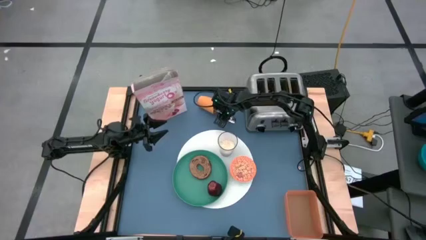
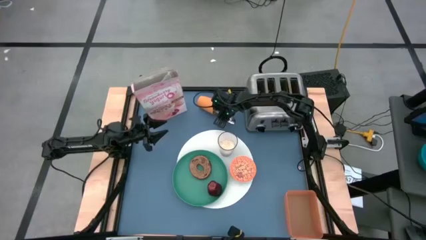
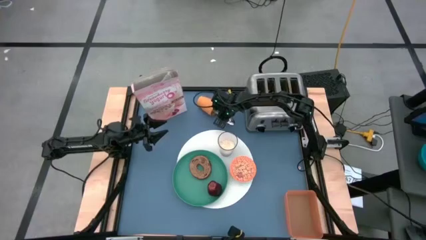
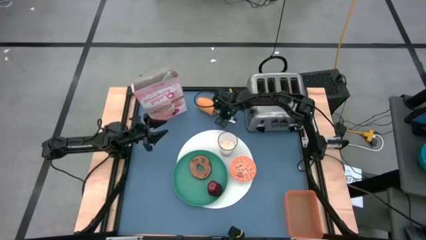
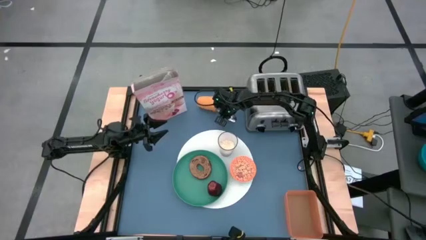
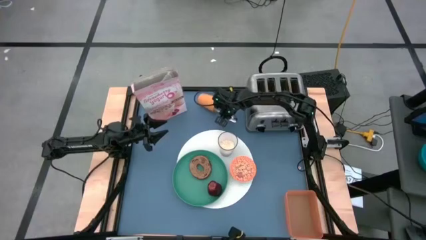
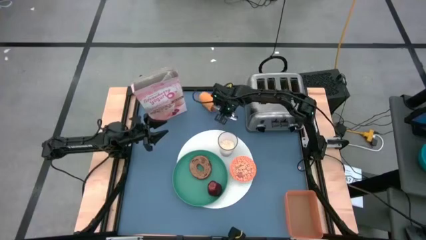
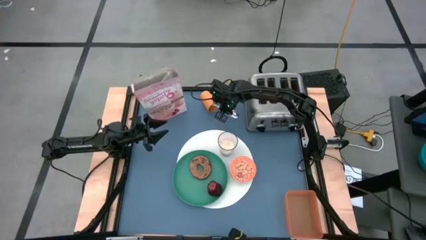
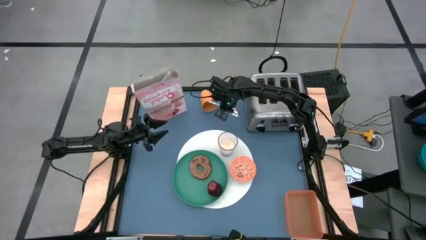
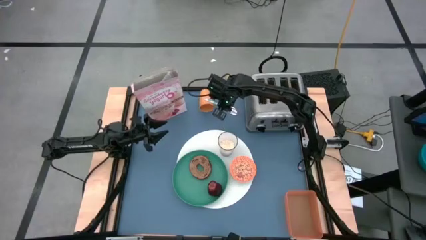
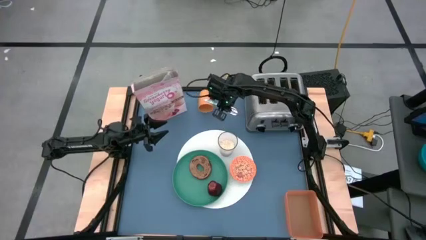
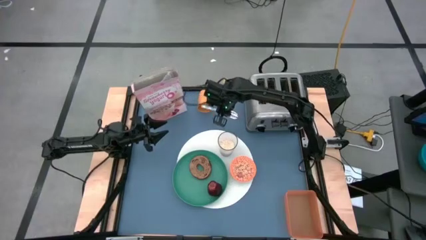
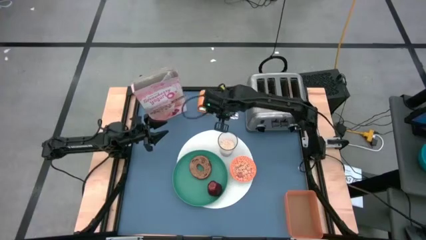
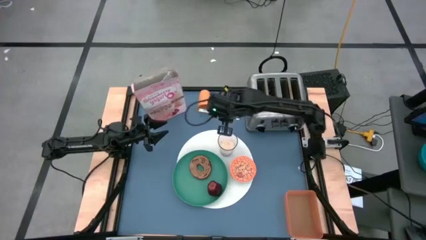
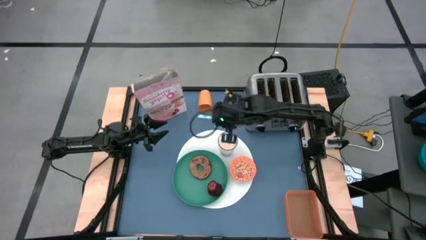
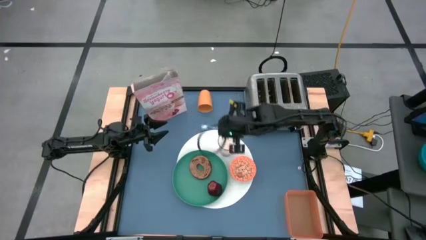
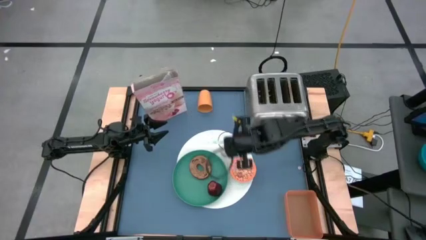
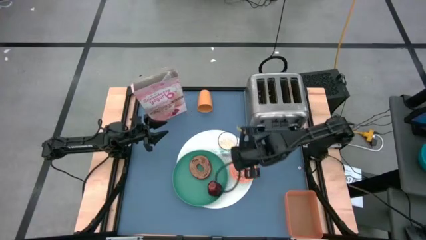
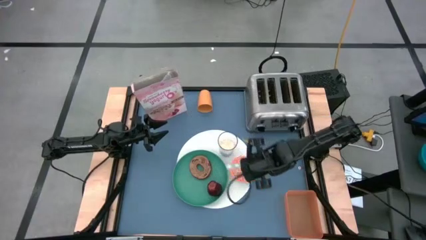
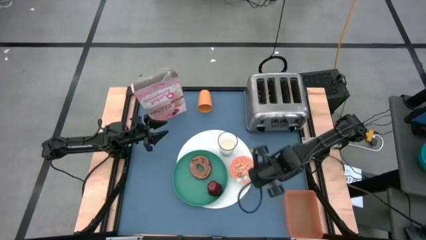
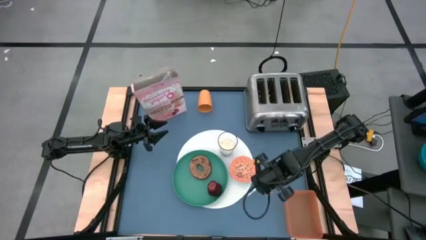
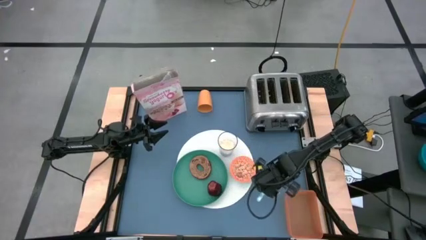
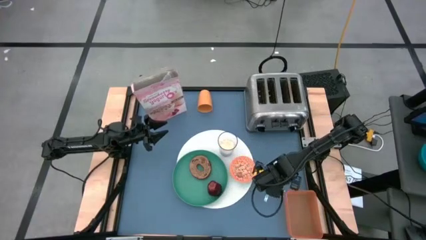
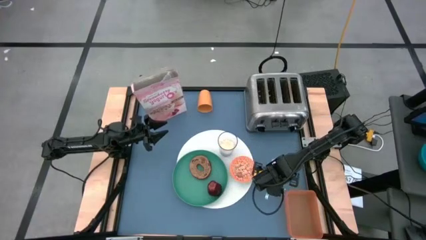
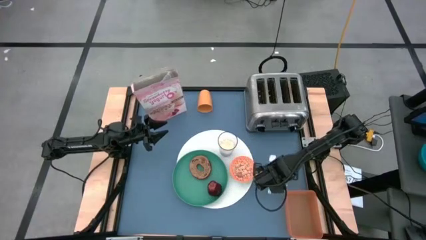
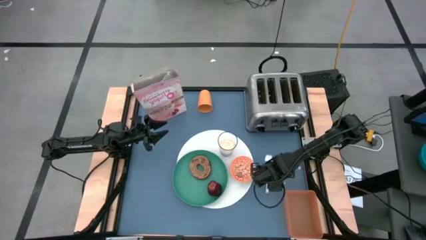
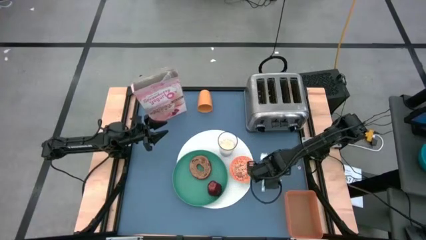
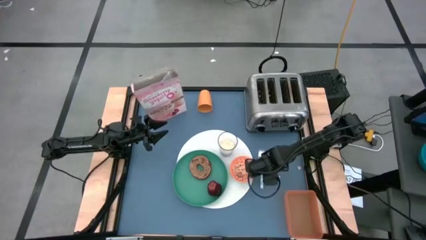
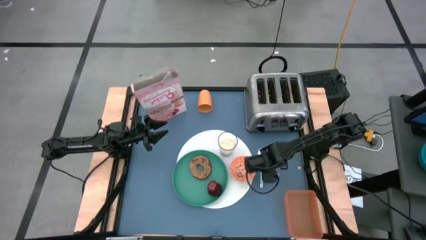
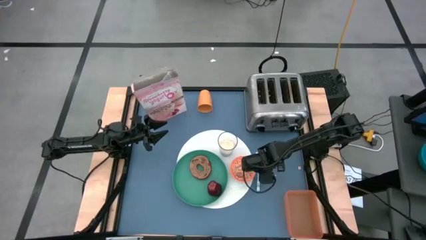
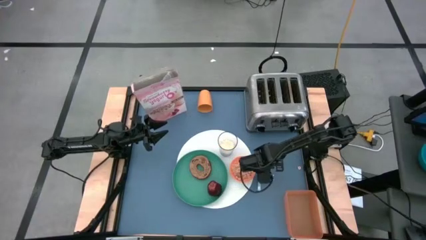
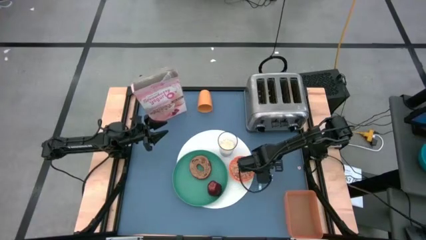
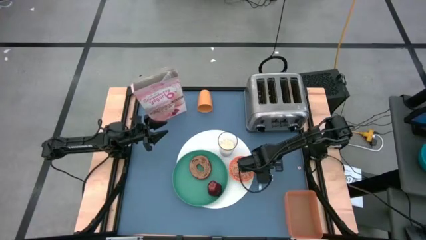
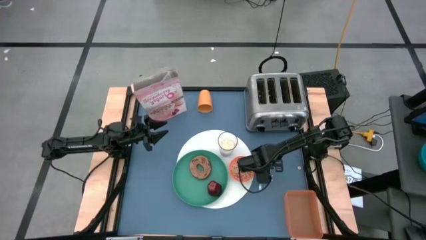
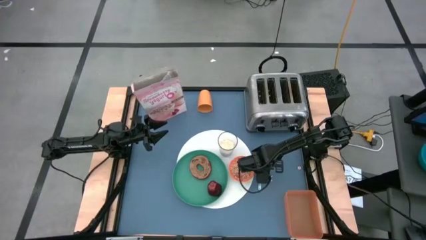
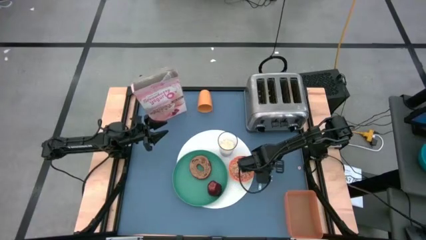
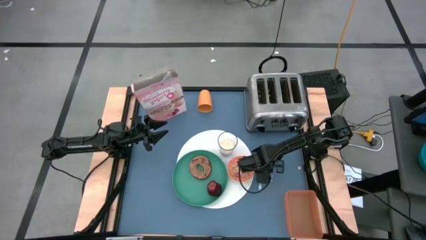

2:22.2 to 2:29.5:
Task: Arrange a breakfast setting
Put the green spoon on the table to the right side of the orange bowl

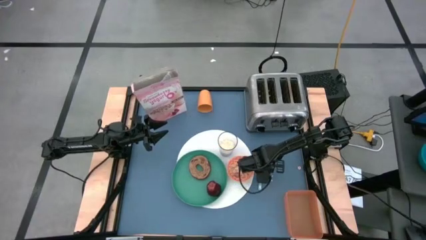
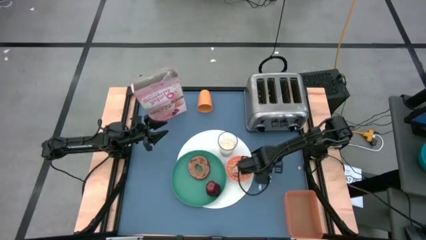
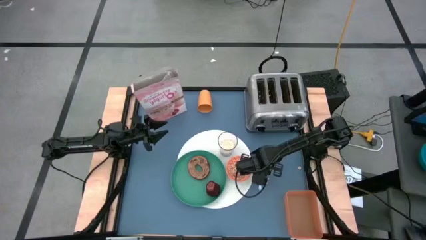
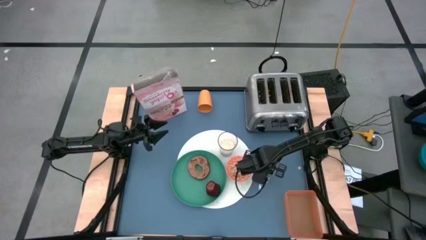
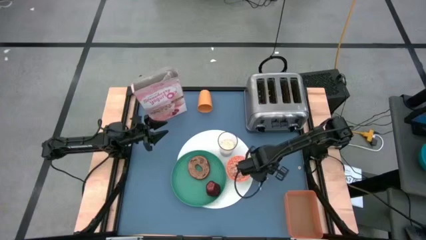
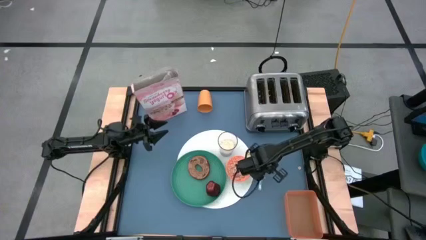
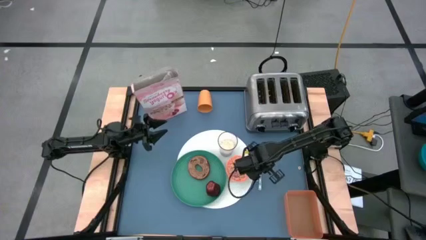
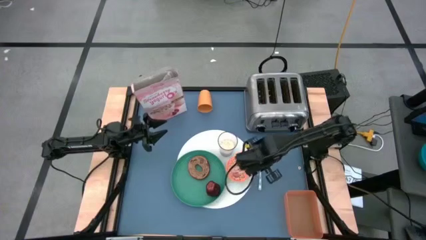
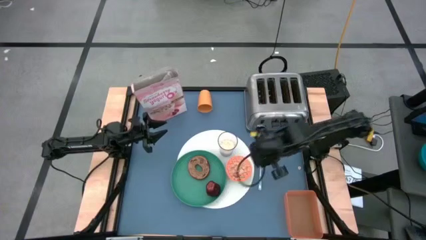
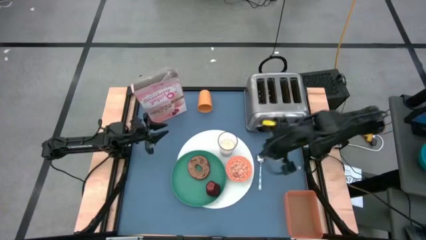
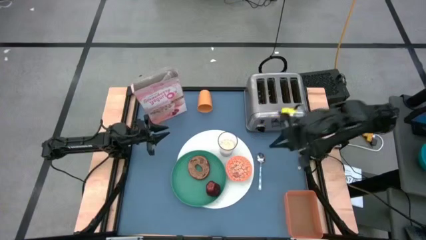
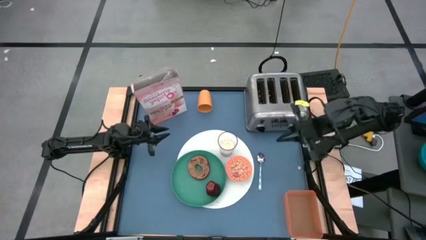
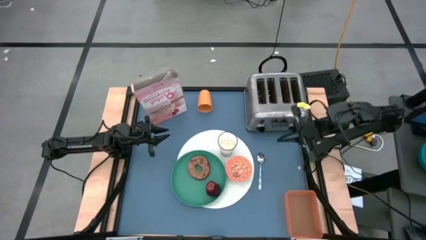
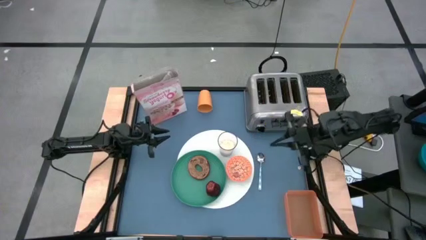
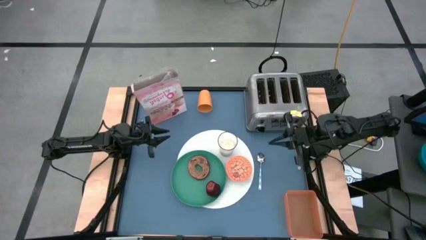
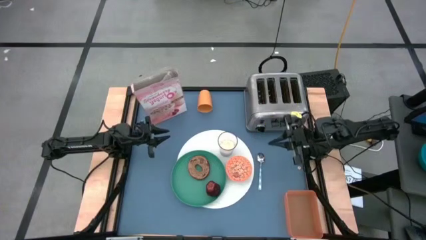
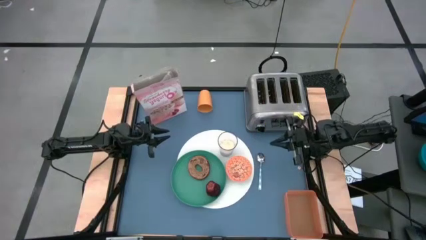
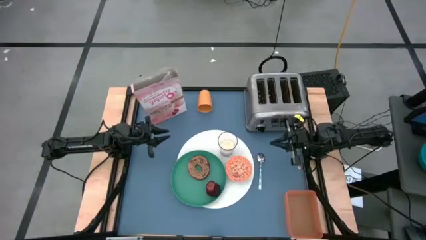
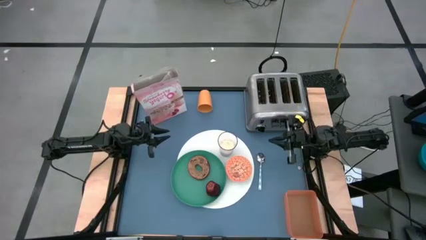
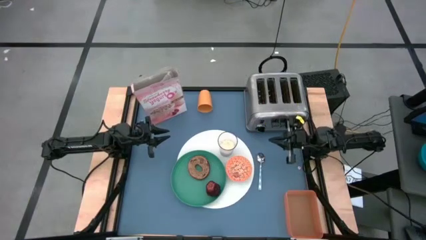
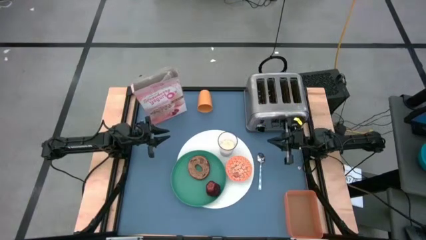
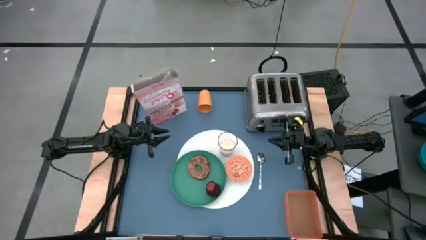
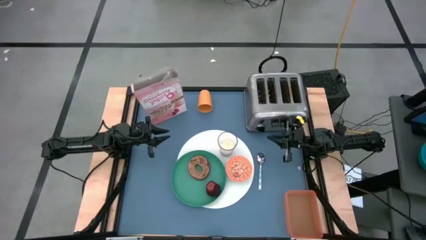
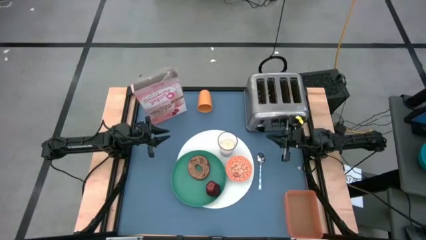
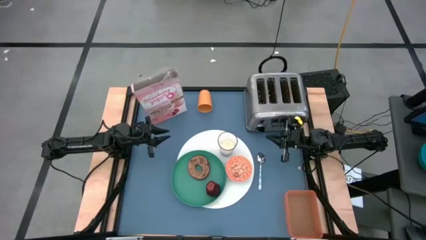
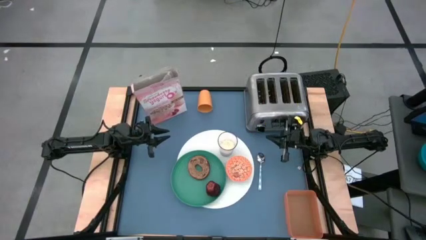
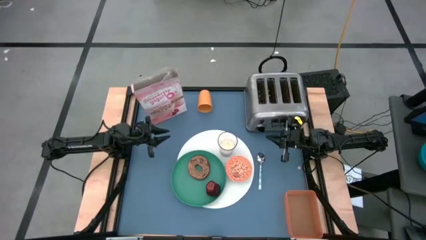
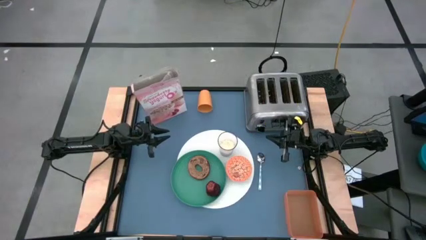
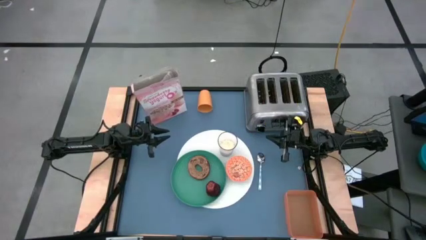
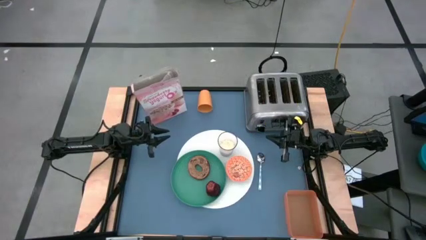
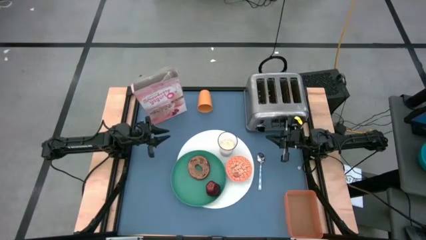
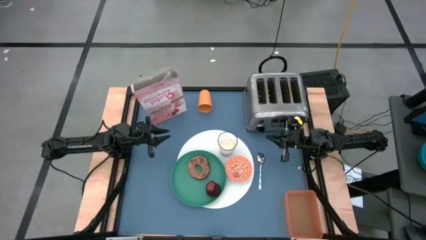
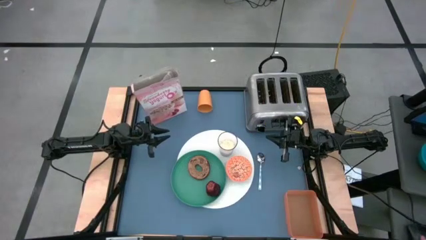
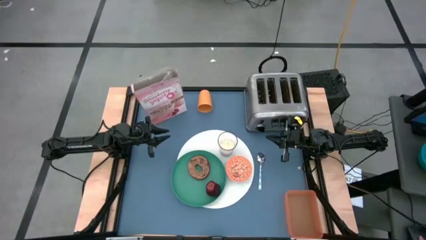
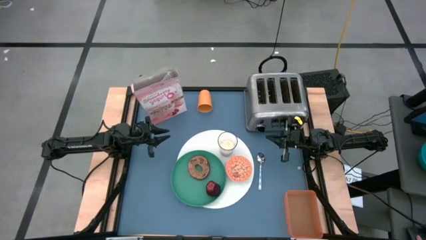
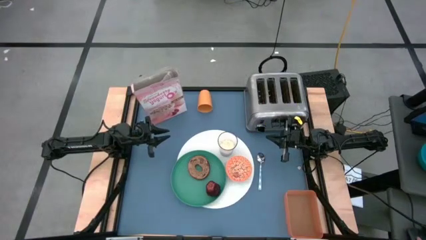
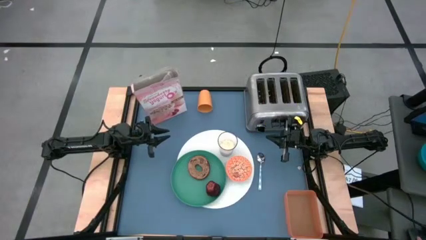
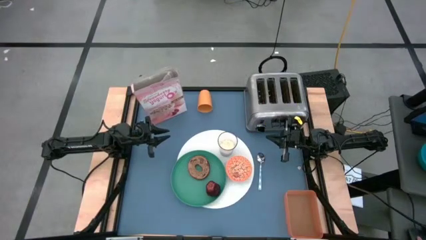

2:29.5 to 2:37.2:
Return to Home Position
